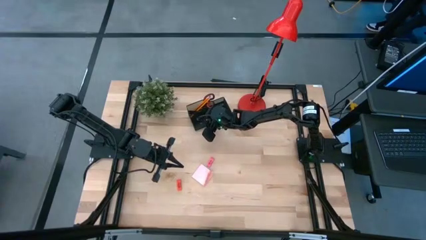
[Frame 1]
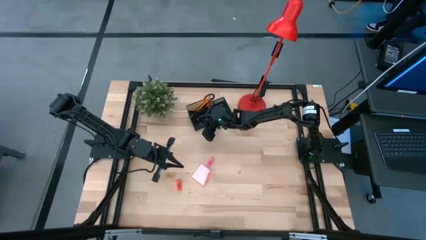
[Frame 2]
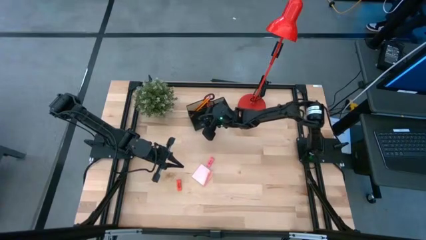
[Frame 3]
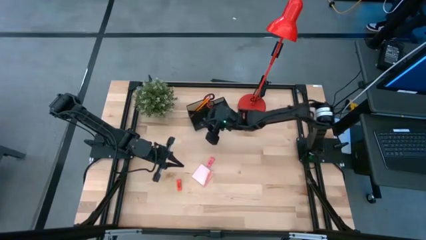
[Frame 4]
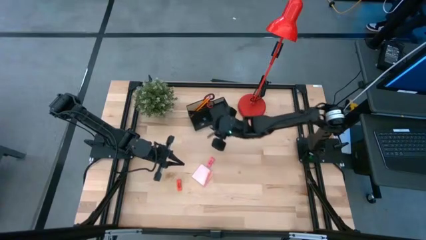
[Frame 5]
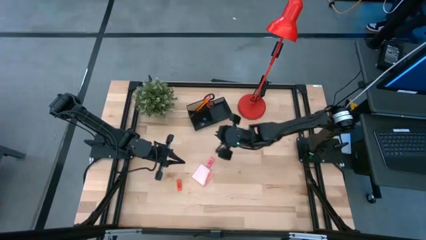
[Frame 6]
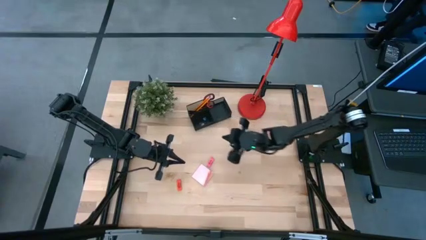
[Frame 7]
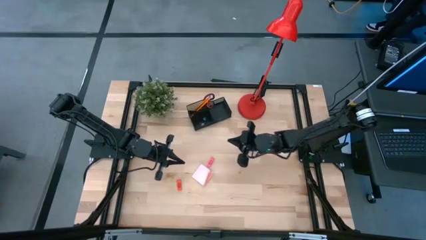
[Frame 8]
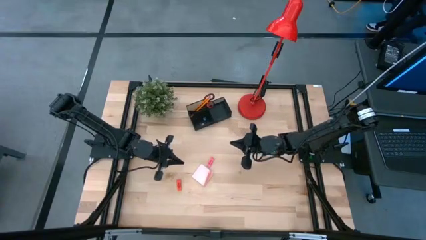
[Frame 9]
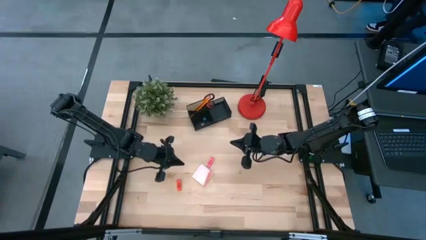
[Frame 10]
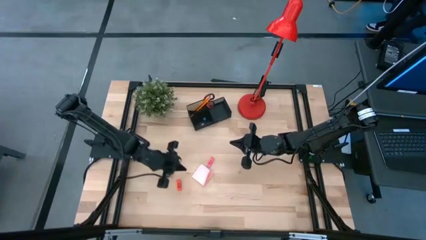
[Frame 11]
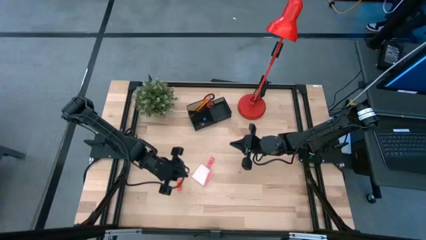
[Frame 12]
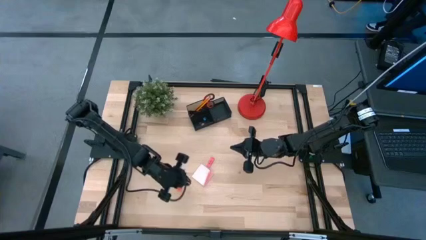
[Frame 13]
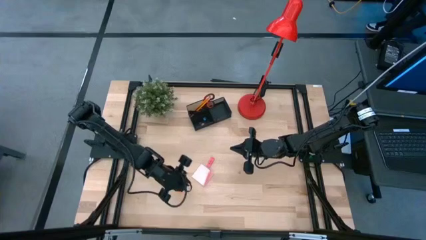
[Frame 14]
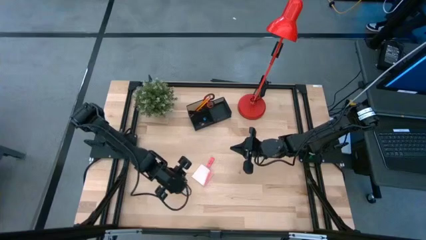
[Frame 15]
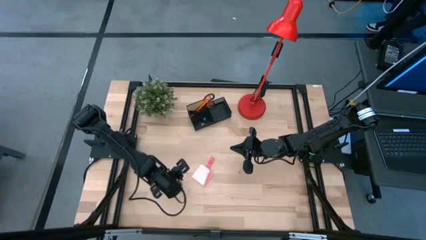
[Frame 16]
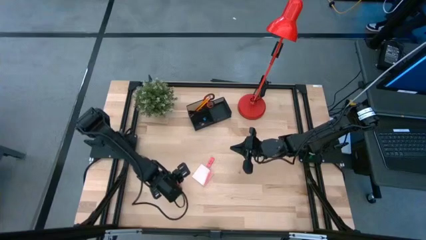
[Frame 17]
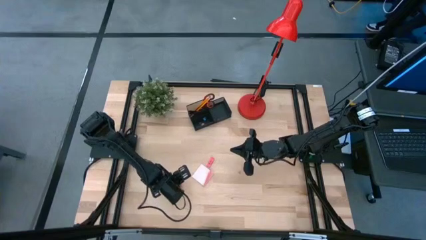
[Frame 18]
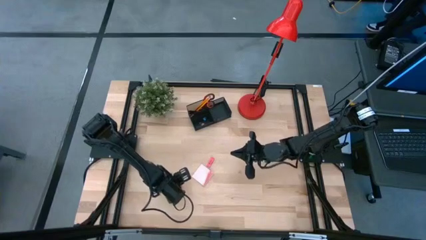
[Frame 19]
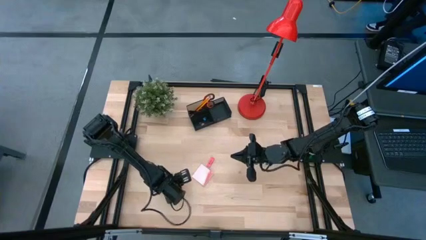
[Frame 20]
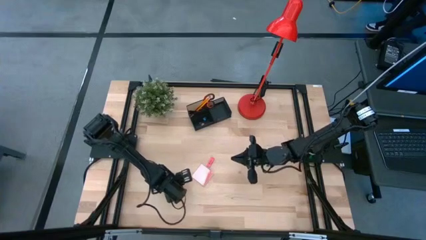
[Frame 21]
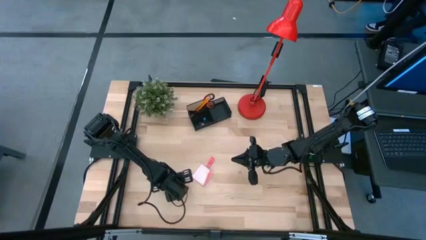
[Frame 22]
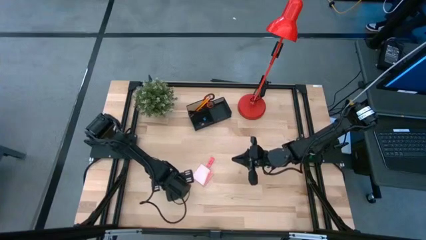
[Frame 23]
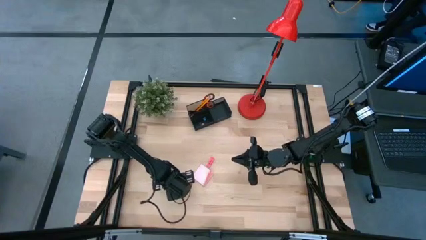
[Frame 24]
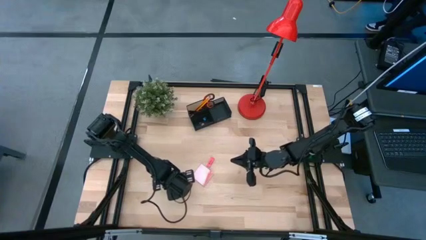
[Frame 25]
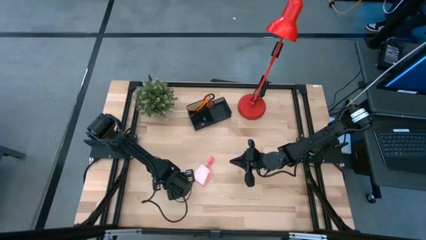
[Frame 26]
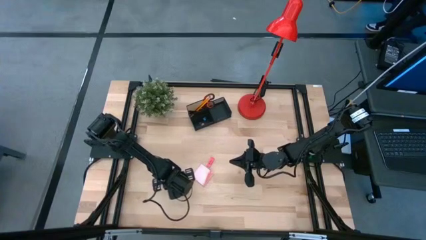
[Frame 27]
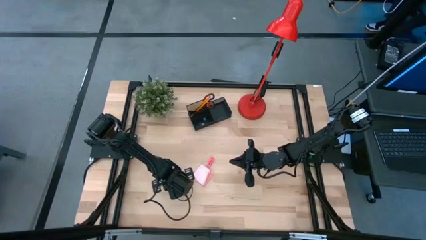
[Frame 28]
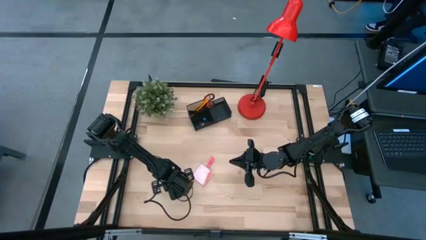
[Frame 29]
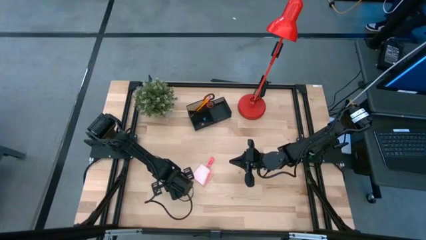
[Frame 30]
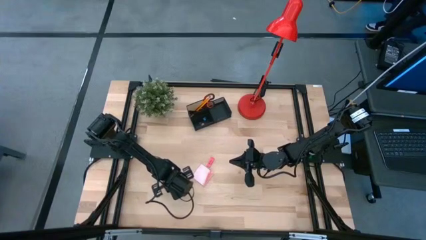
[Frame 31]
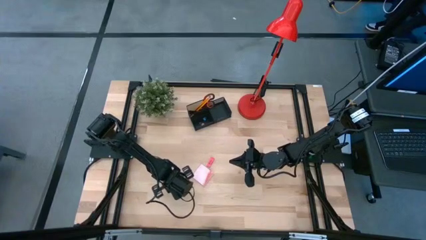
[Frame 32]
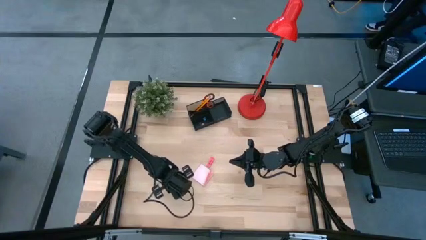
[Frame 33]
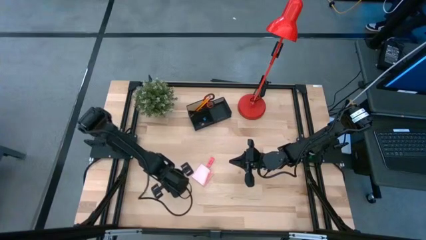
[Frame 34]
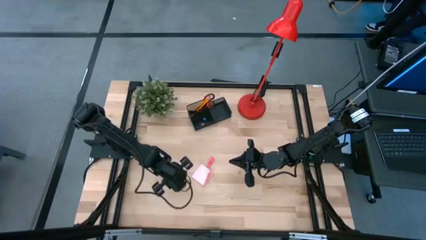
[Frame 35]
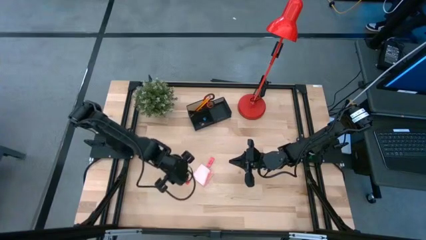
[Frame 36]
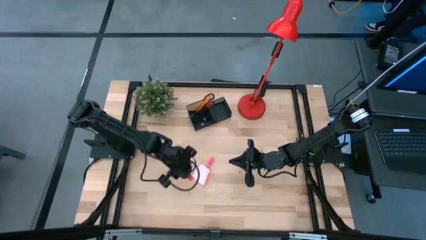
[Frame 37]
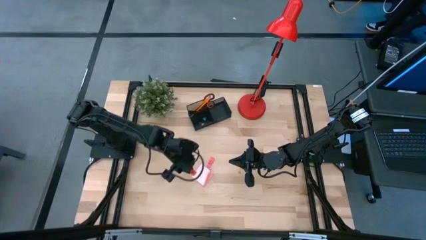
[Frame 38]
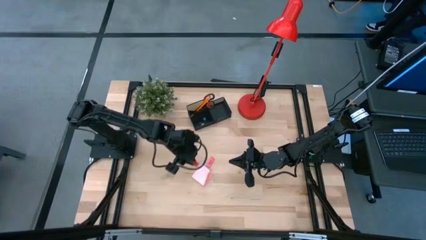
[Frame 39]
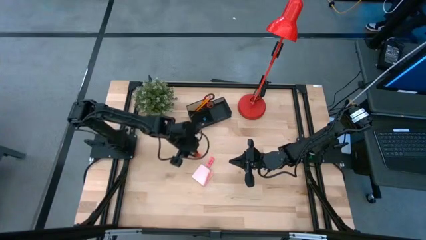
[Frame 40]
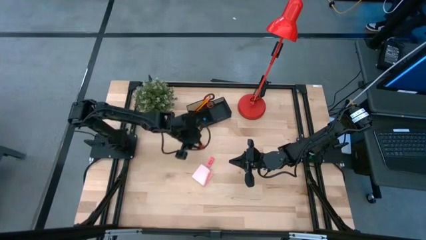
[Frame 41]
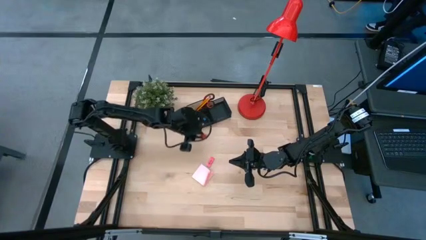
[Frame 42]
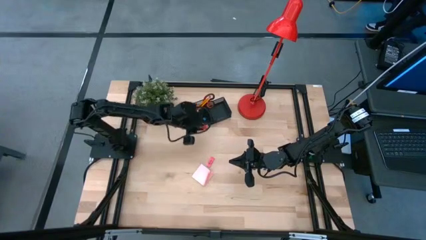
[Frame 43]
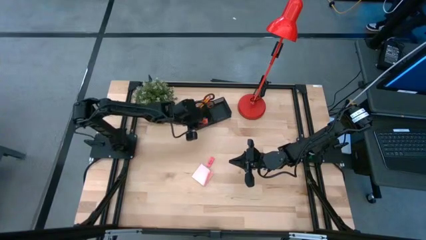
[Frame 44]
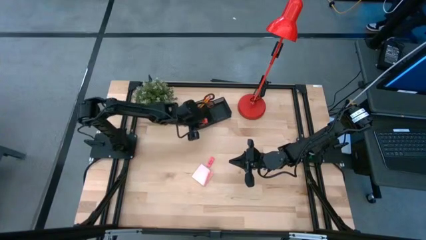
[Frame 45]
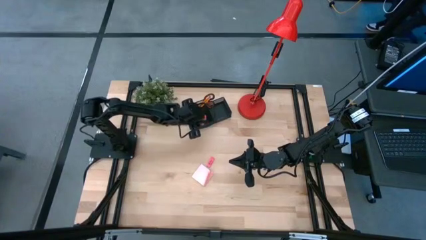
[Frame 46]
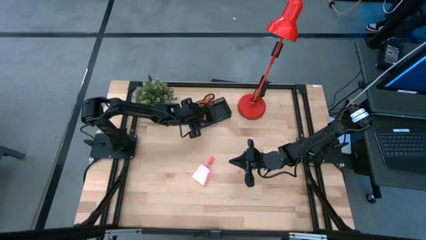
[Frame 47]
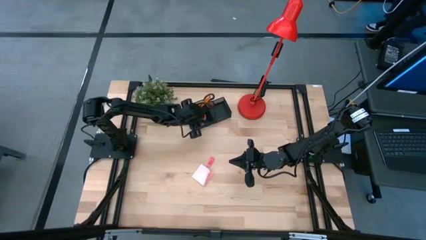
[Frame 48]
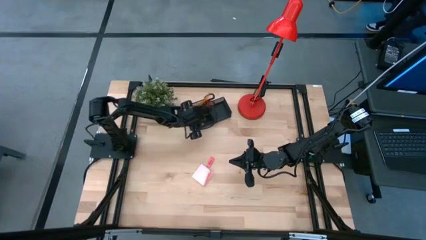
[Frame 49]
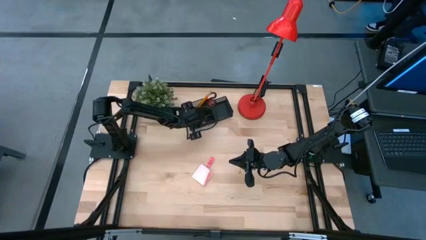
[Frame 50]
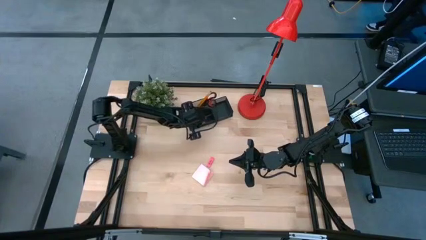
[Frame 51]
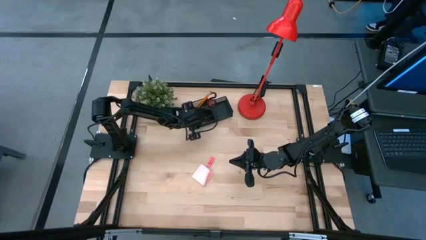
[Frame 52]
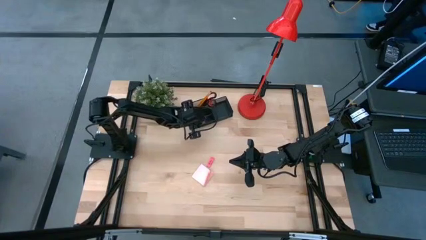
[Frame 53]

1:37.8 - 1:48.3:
Task: Pick and place office supplies into organizer
Put the orange eraser into the black desk organizer

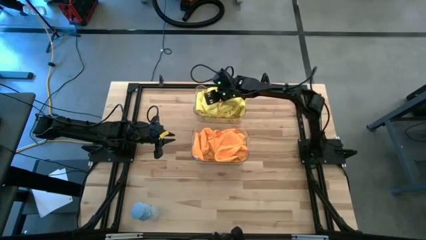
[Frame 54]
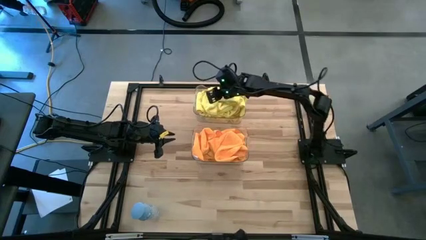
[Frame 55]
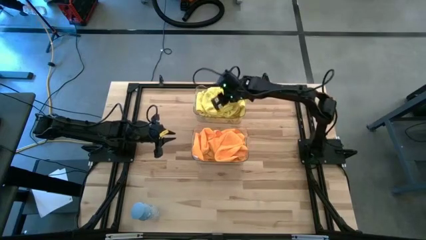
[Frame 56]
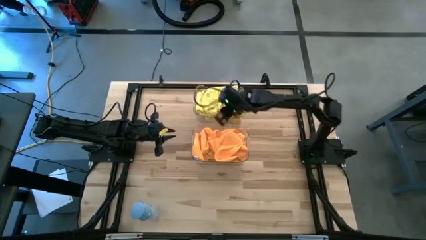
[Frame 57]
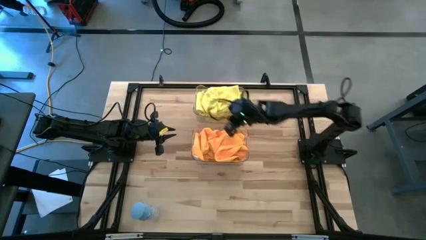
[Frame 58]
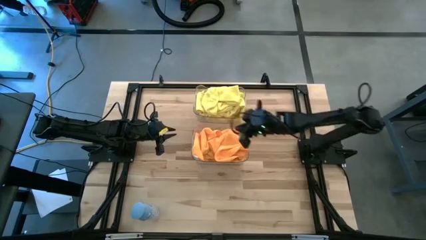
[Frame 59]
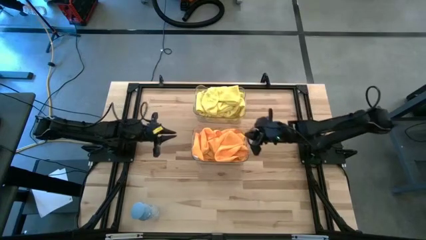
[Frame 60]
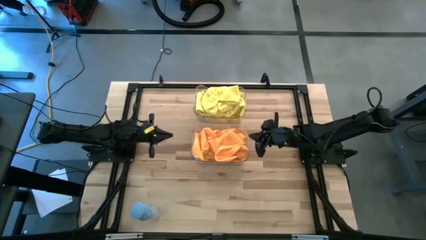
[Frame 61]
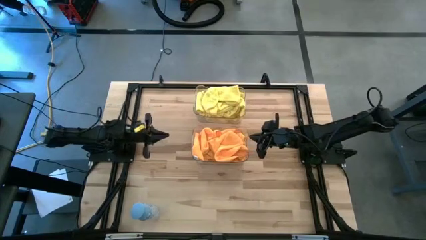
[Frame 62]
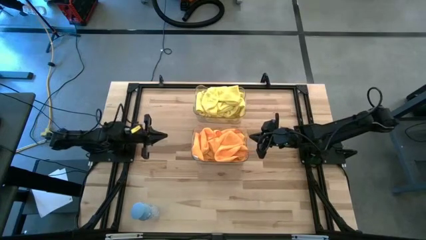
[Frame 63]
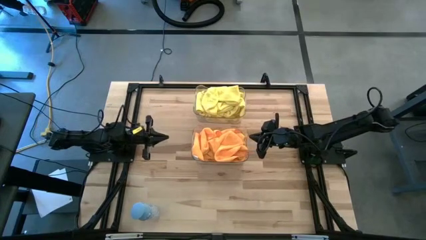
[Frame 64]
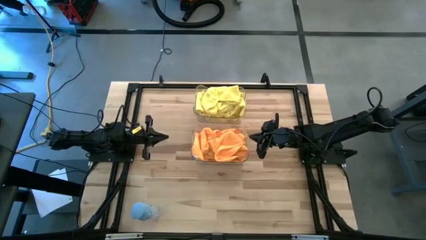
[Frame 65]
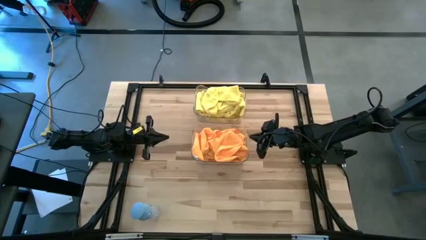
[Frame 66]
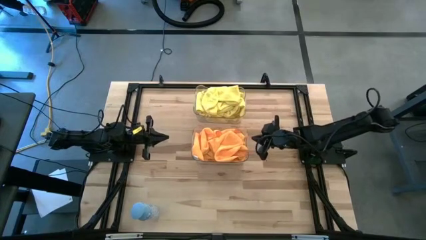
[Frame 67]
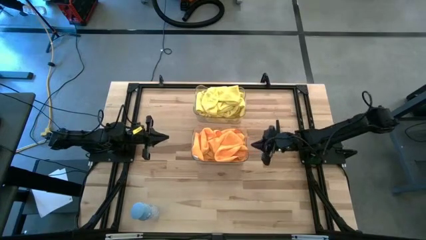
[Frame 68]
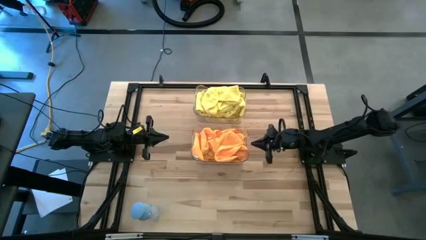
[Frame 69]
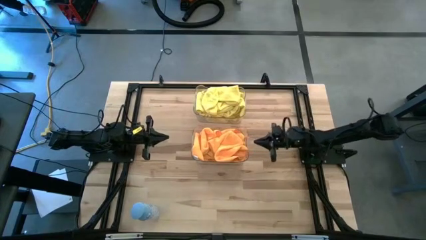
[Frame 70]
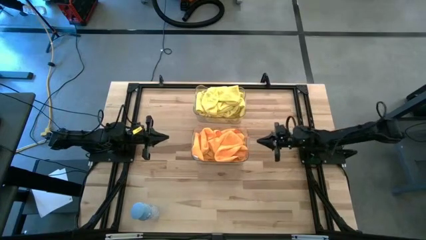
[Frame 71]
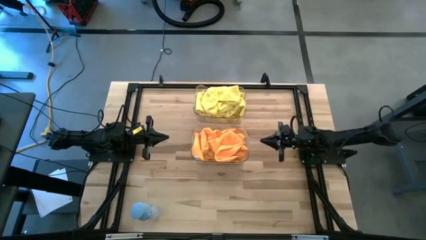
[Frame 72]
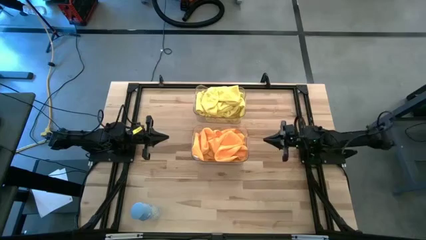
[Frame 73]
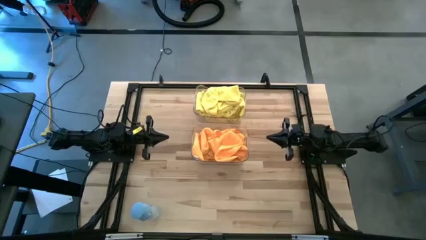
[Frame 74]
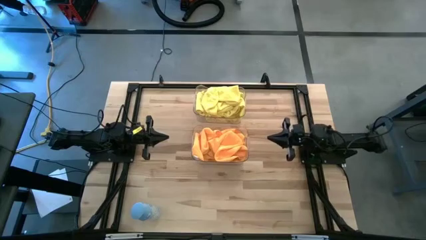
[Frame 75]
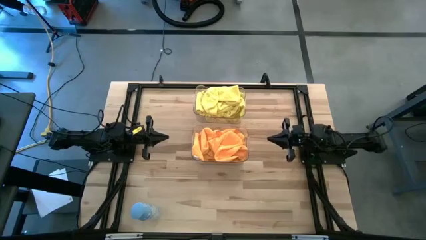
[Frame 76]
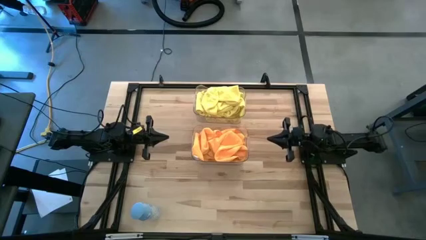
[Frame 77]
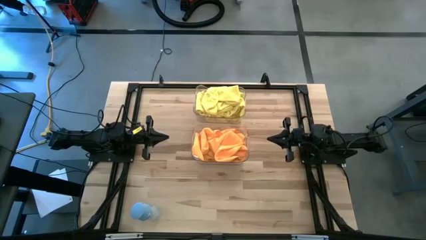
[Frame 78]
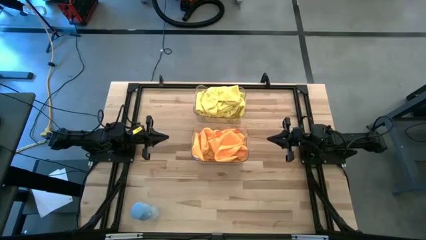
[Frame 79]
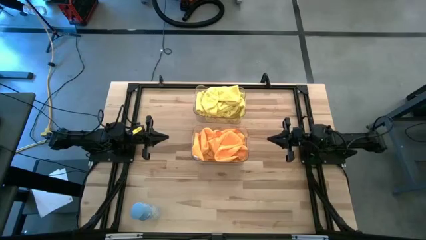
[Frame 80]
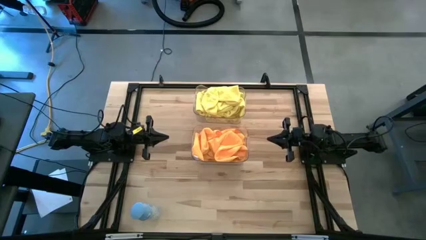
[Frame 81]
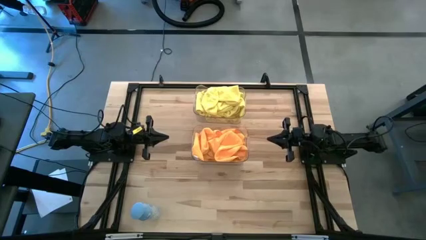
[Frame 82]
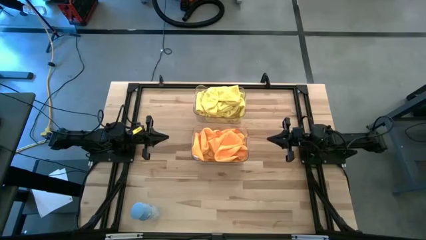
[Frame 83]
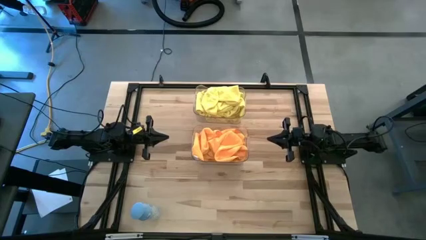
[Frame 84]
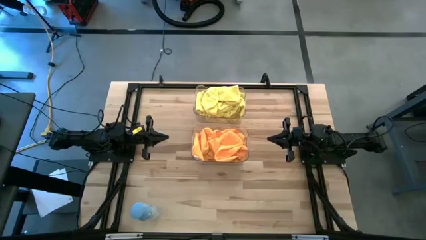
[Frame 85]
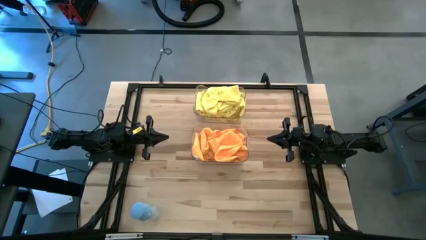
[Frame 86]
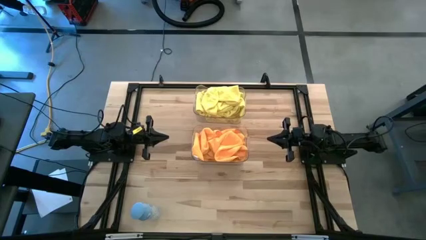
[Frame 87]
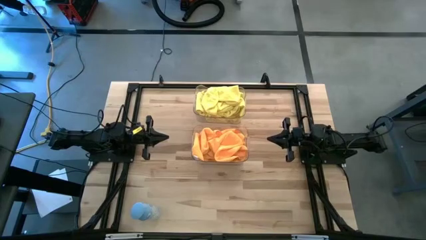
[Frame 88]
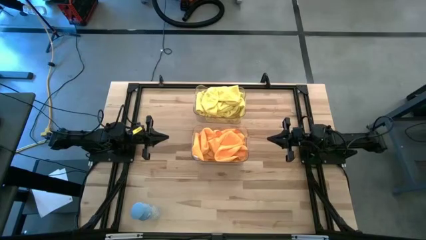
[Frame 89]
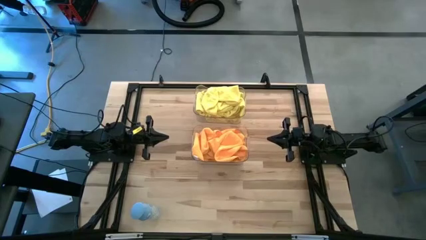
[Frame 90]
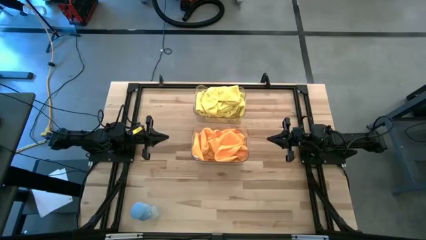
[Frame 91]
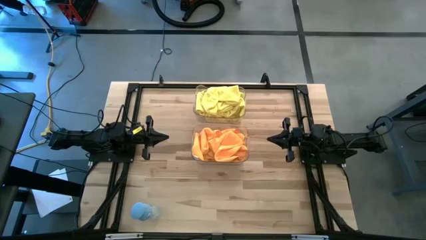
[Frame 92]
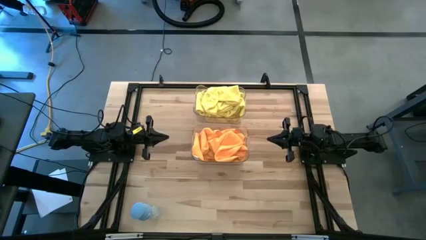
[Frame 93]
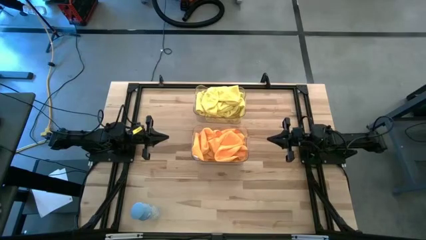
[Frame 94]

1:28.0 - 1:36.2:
Task: Sort microfiber towel by color & place in baskets
Return to Home Position
